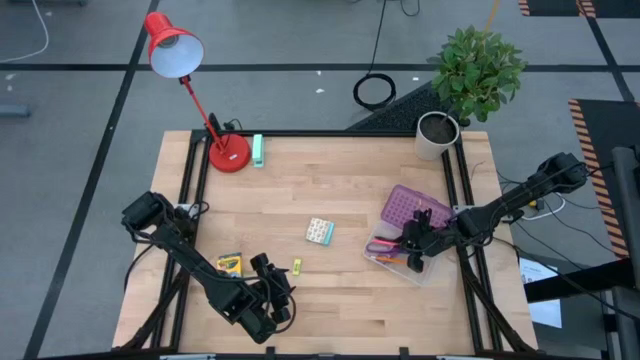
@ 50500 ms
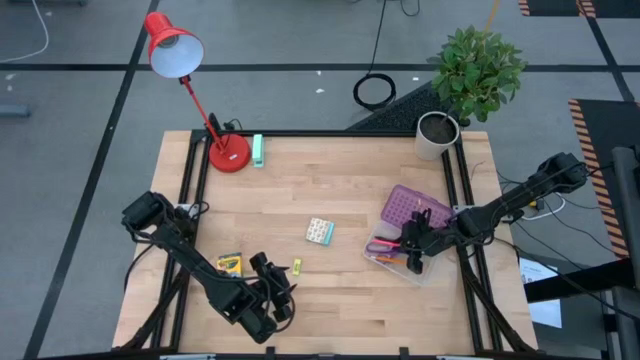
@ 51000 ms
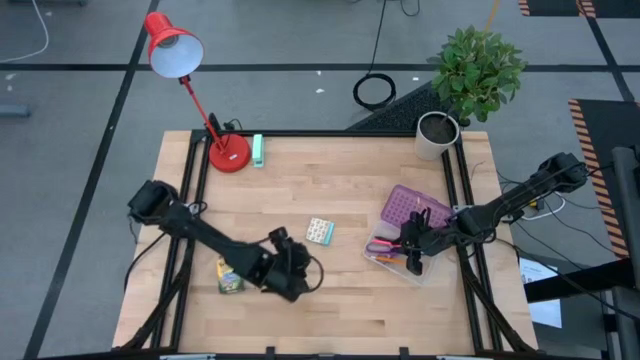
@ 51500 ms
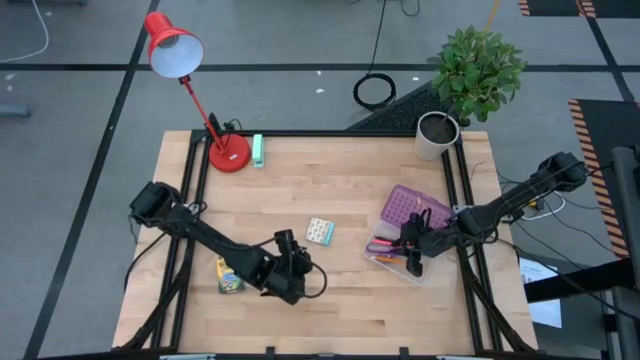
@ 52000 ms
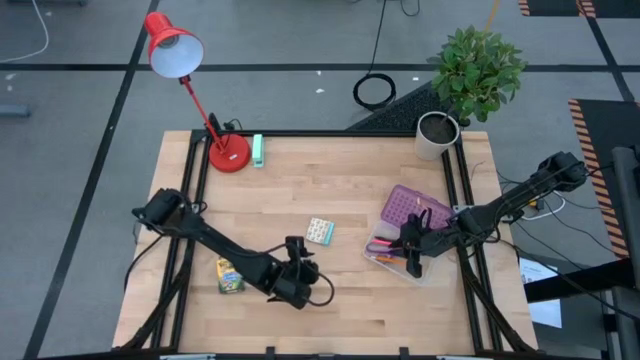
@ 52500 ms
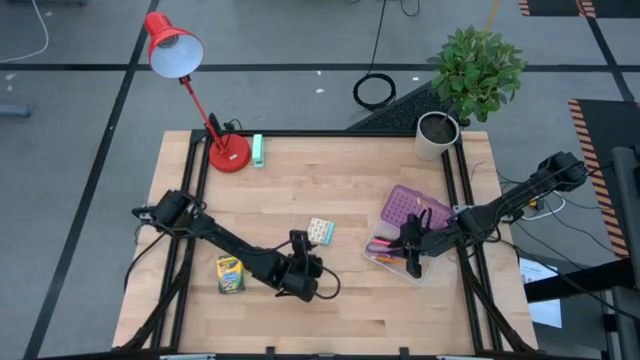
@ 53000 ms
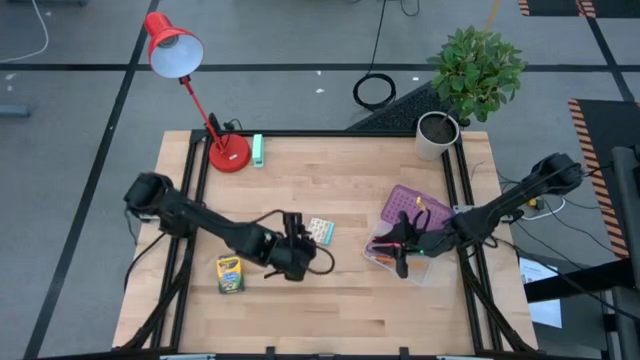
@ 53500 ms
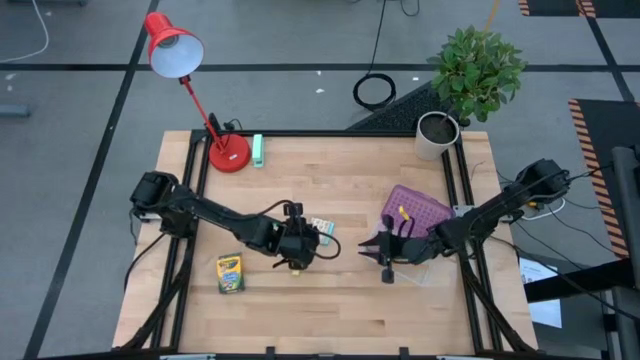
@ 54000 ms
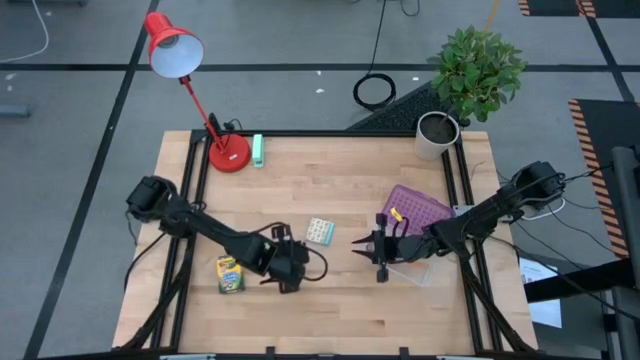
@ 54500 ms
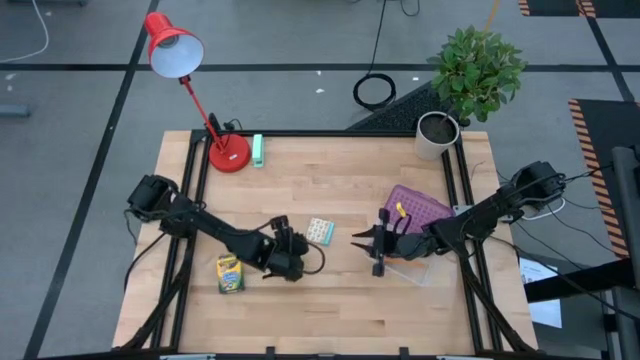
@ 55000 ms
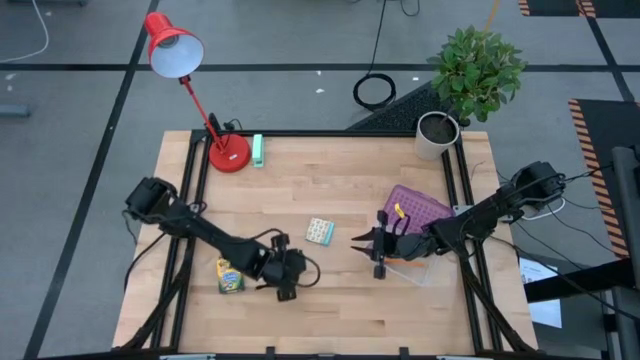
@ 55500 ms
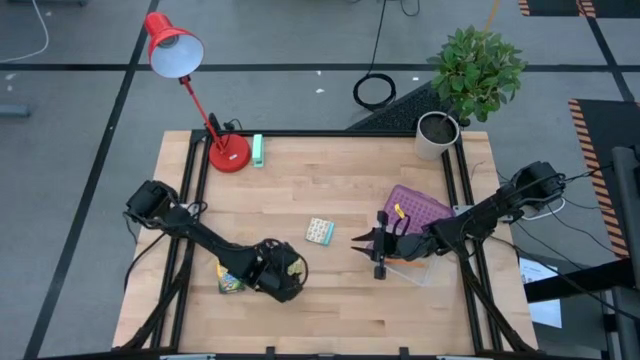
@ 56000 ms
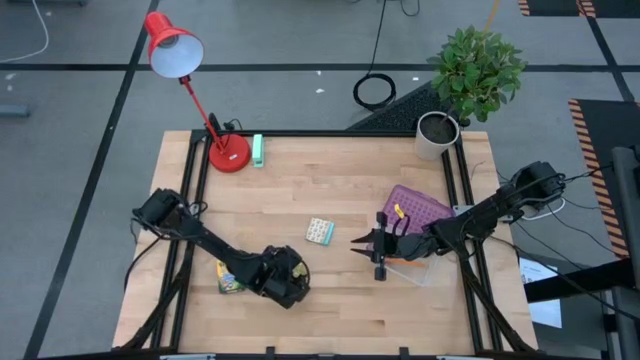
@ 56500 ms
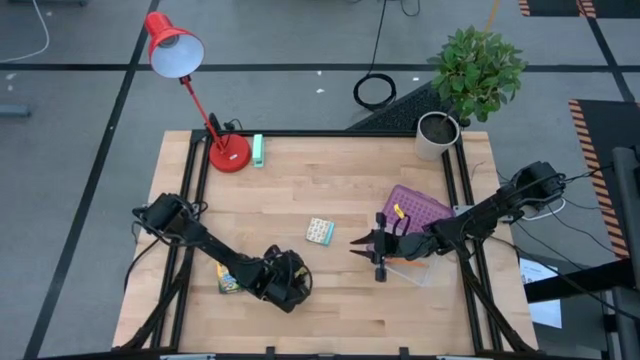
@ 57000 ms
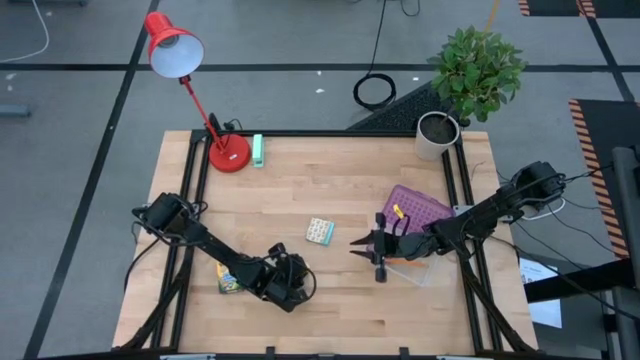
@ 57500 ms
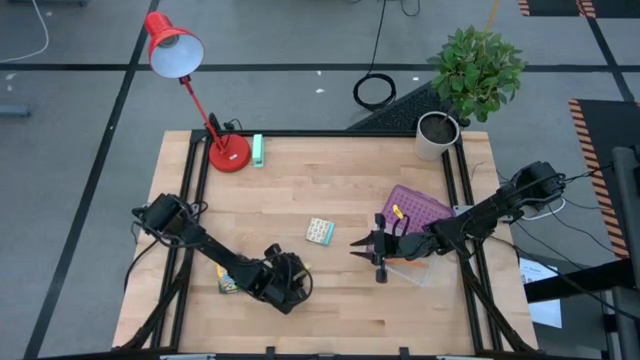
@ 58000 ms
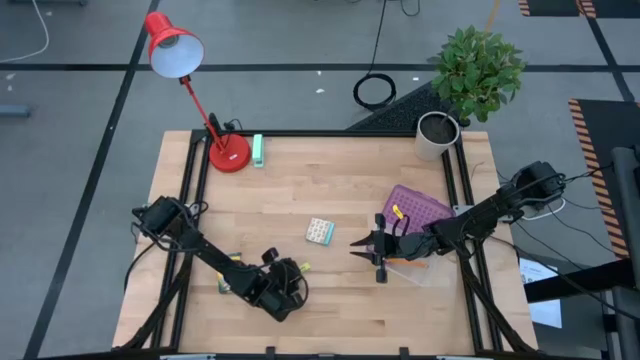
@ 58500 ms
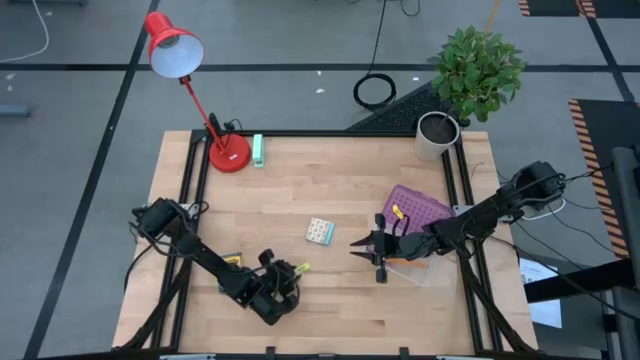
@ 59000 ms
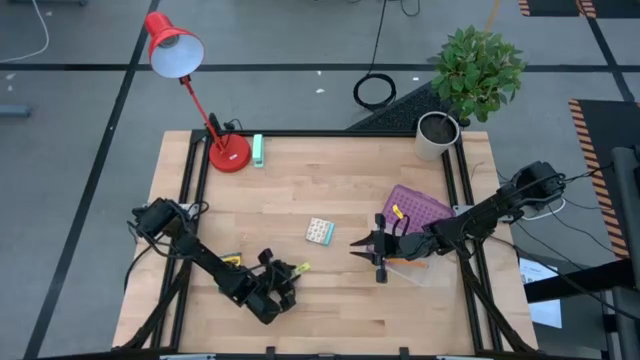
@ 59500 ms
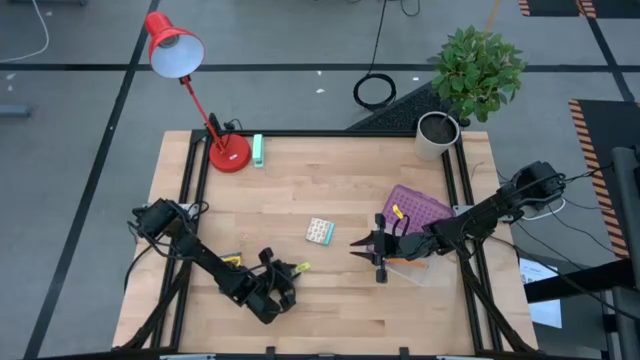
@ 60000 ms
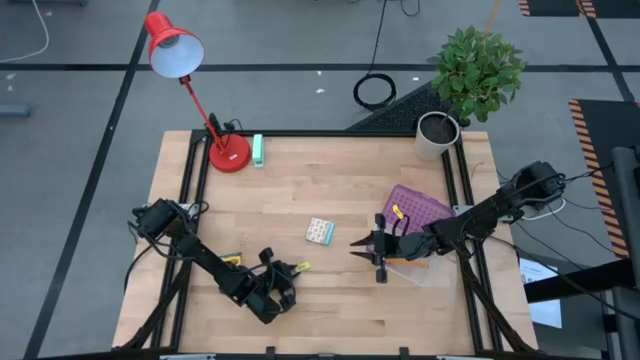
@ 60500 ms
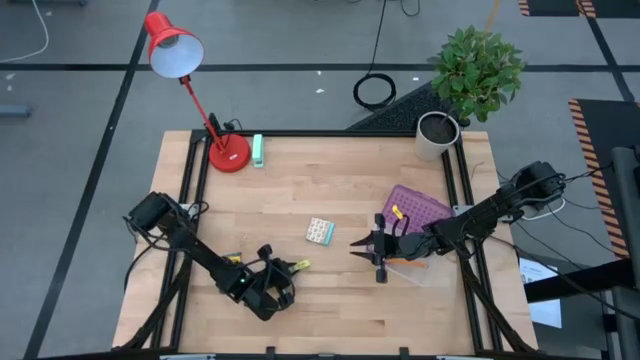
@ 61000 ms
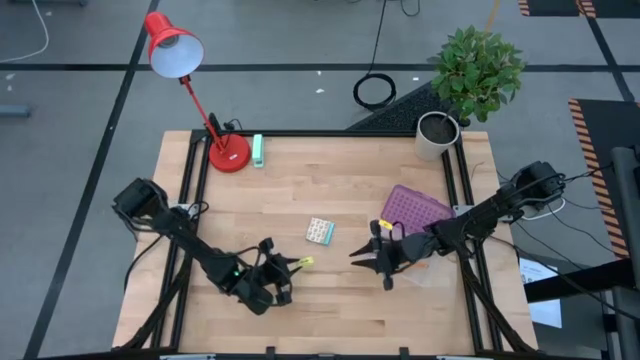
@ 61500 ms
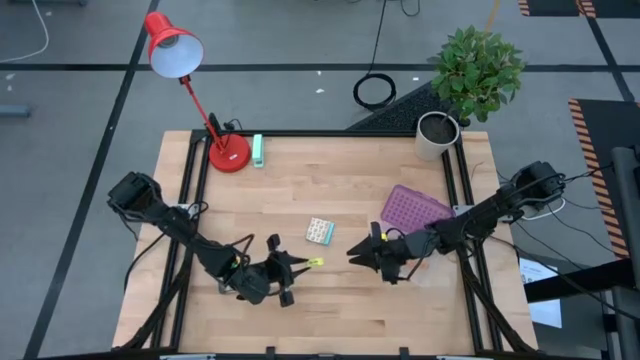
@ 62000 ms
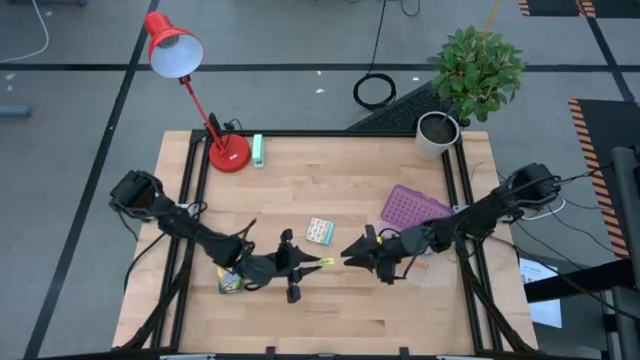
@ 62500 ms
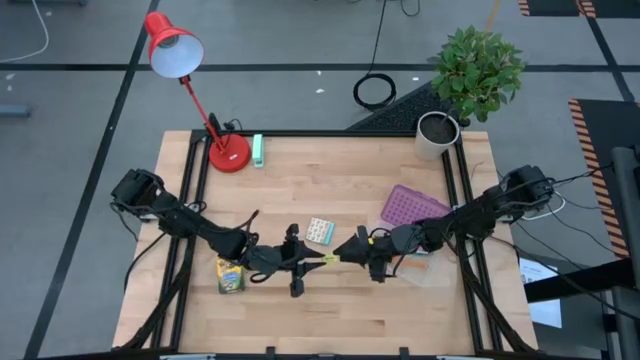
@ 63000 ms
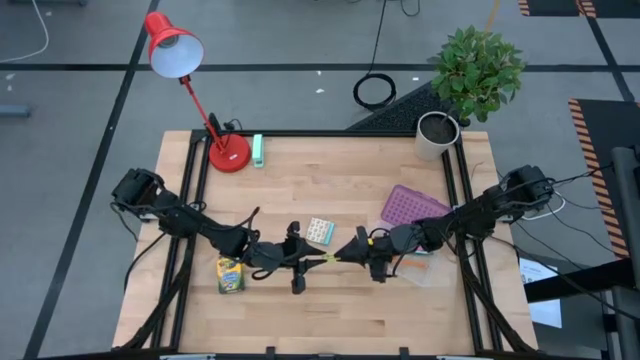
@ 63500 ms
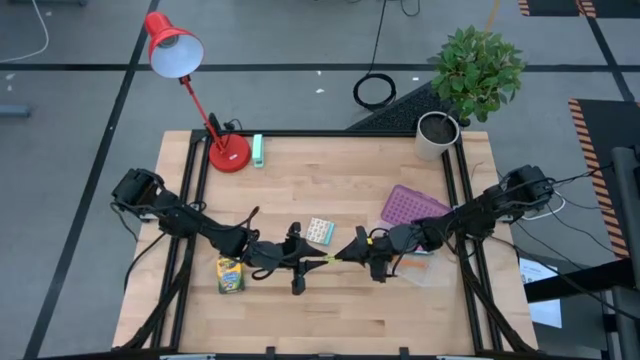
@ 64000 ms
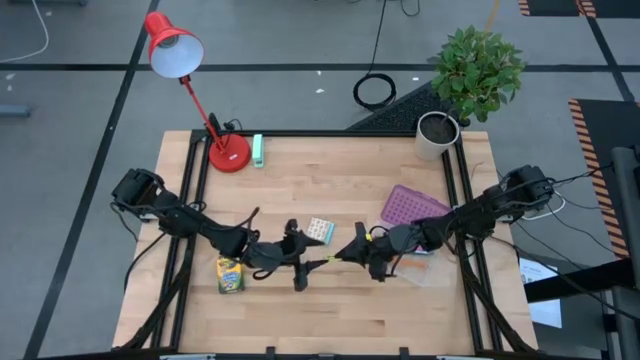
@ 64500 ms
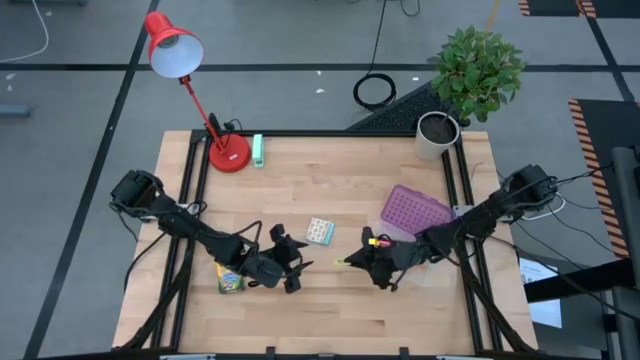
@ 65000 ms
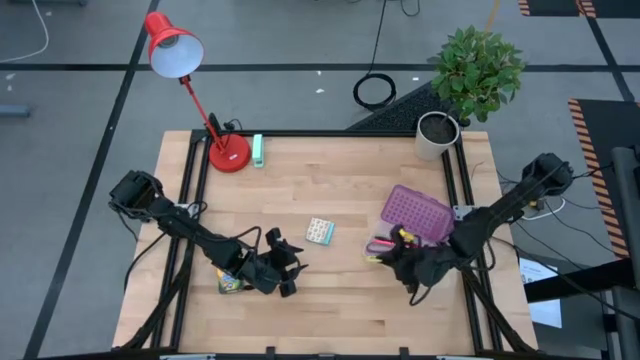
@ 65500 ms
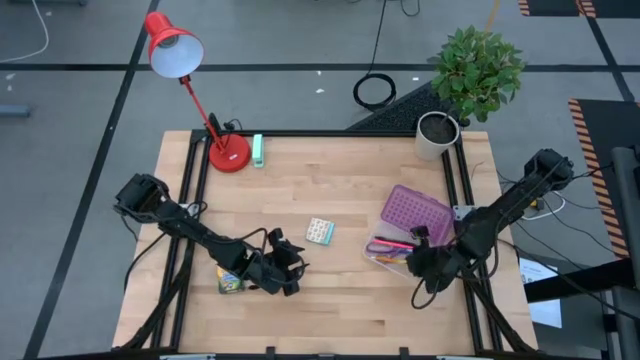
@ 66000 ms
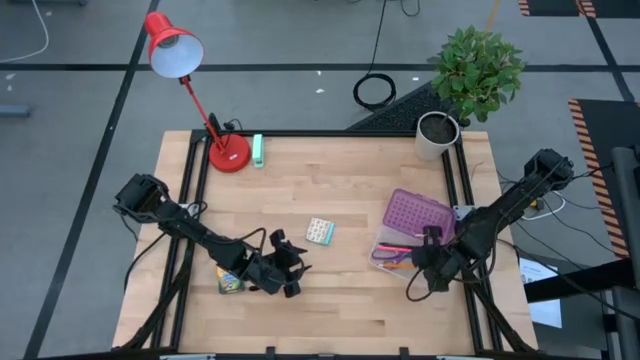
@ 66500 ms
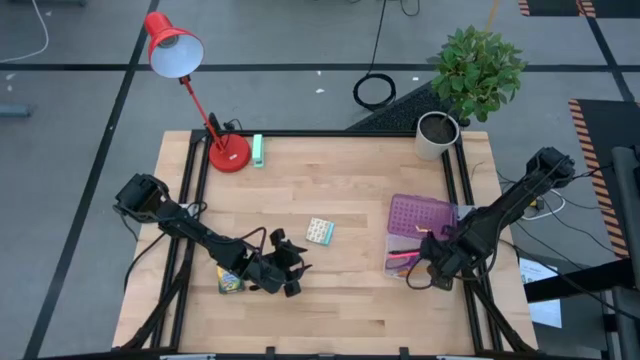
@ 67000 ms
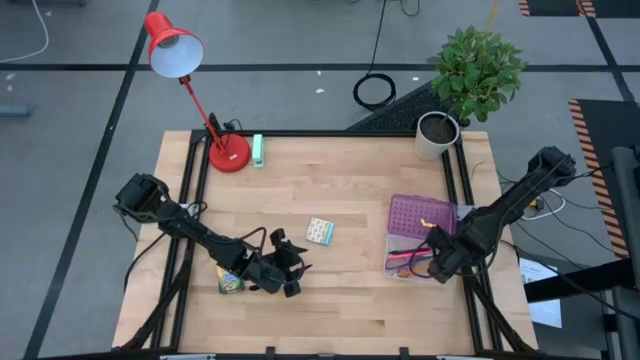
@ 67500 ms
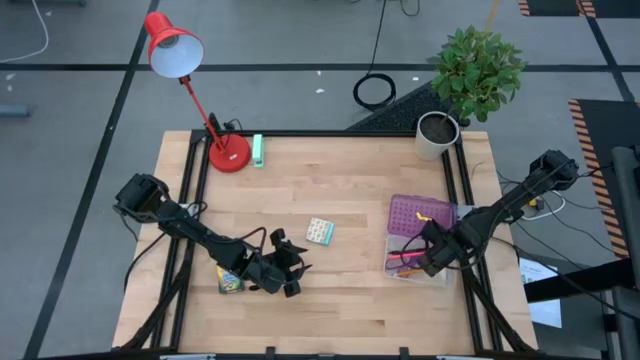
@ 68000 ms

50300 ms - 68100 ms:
Task: Pack school essentials
Put the eraser into the supply box

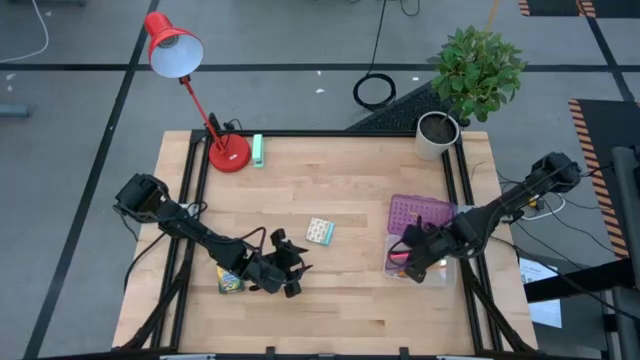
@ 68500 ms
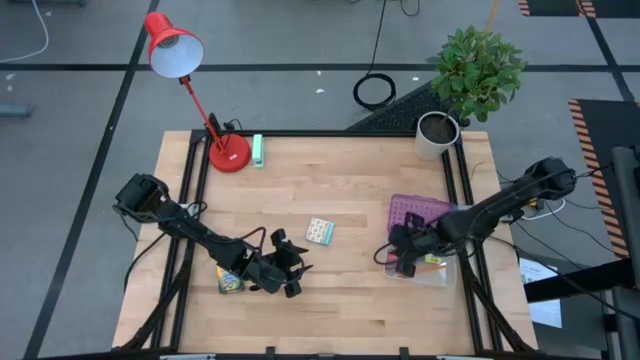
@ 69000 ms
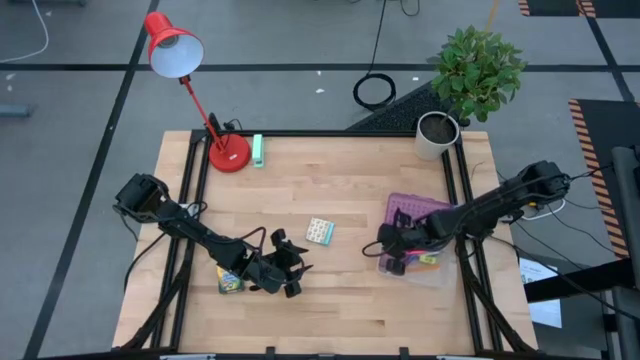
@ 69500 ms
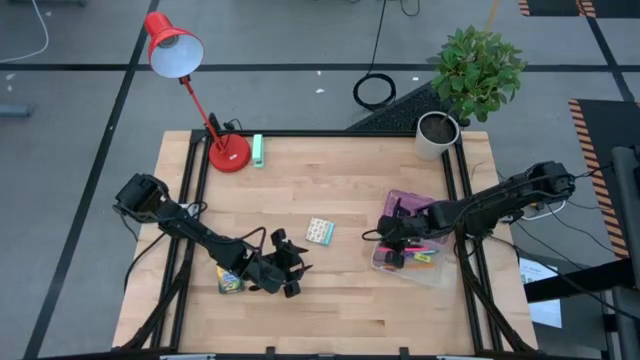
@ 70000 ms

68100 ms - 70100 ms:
Adjust the supply box

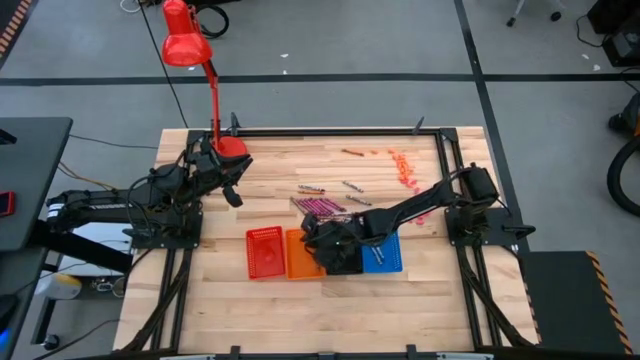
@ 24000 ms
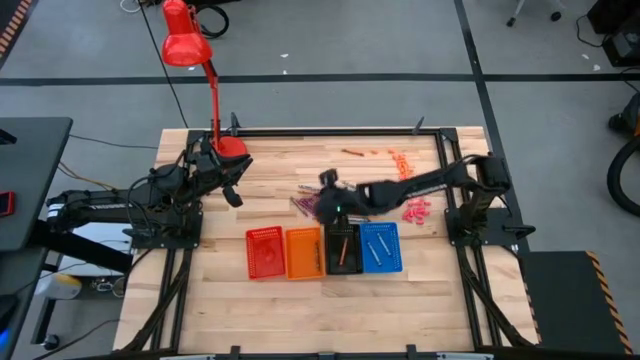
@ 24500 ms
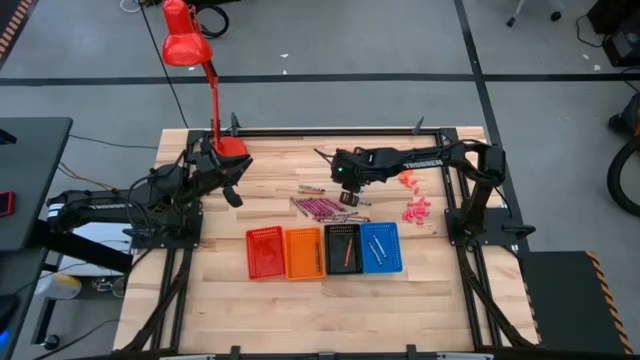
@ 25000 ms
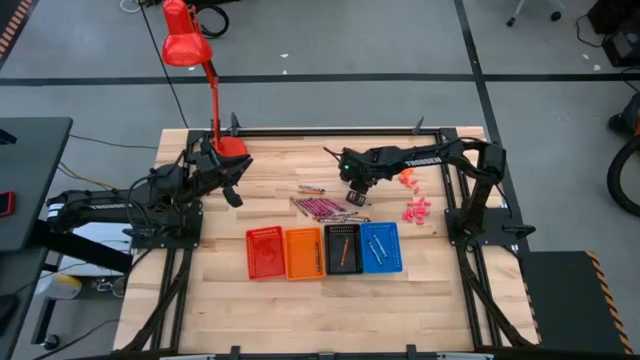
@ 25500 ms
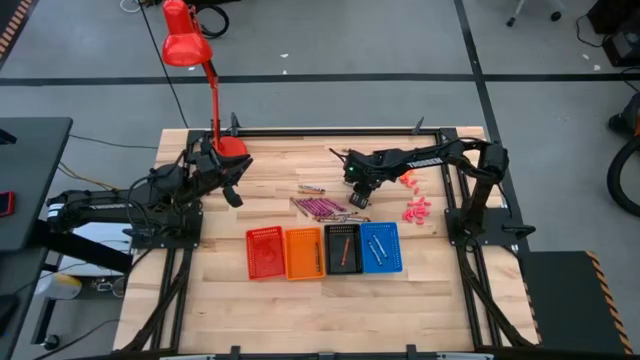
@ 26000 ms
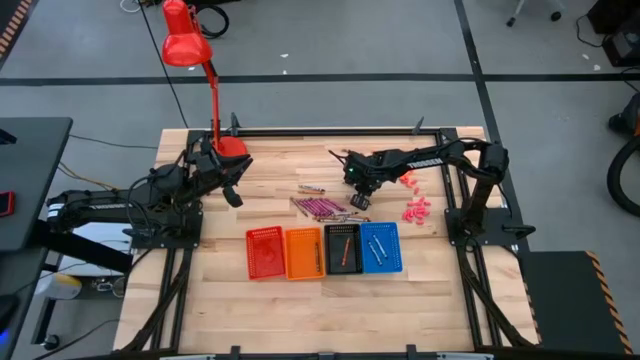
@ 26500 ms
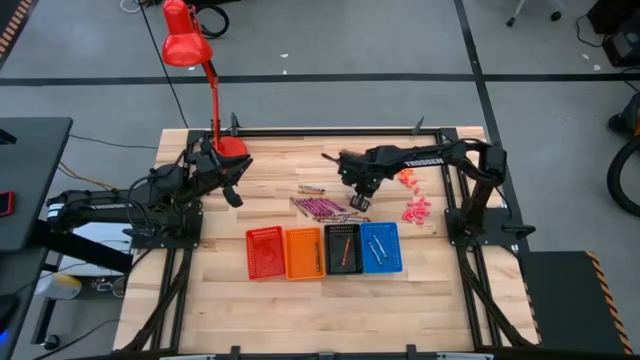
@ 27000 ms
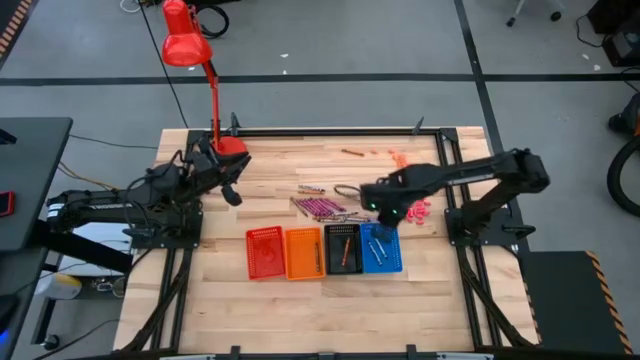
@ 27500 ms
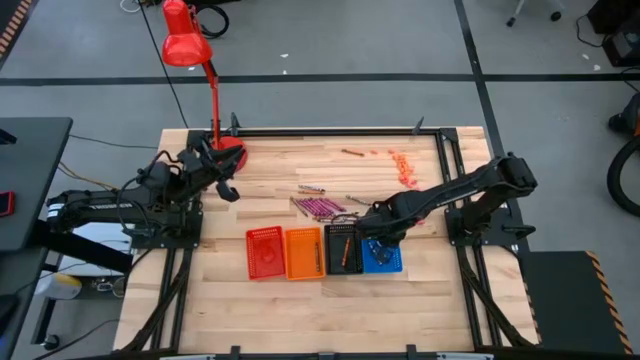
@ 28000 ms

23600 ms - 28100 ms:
Task: Sort crayons
Put the black crayon into the blue bin
